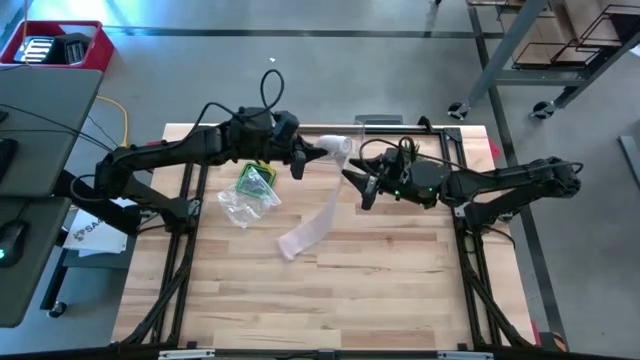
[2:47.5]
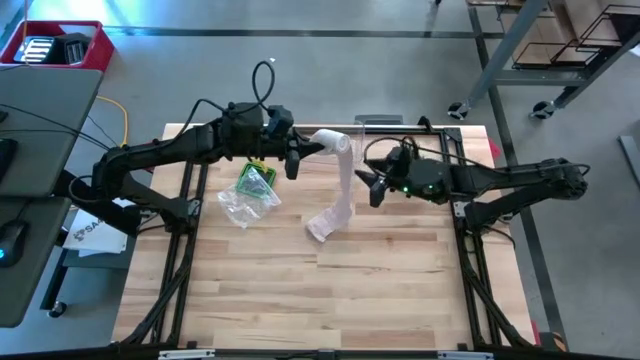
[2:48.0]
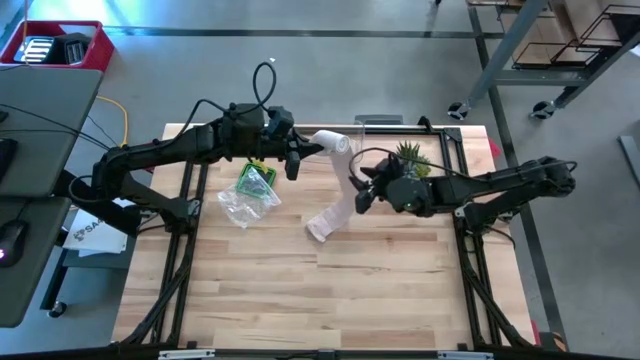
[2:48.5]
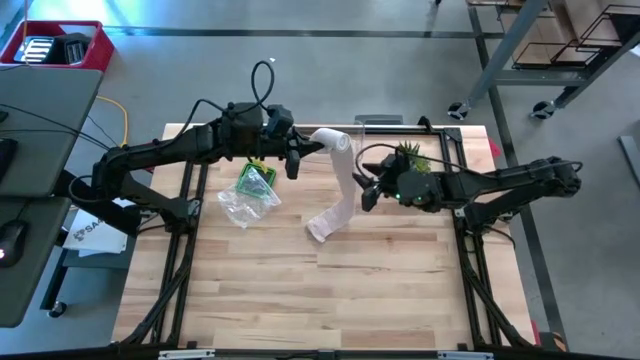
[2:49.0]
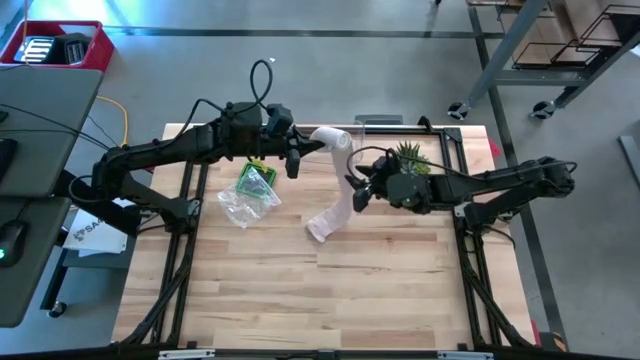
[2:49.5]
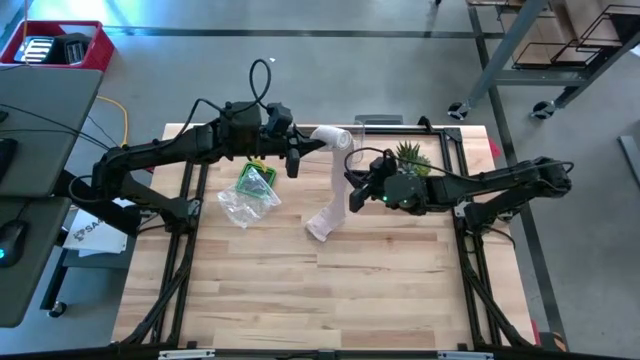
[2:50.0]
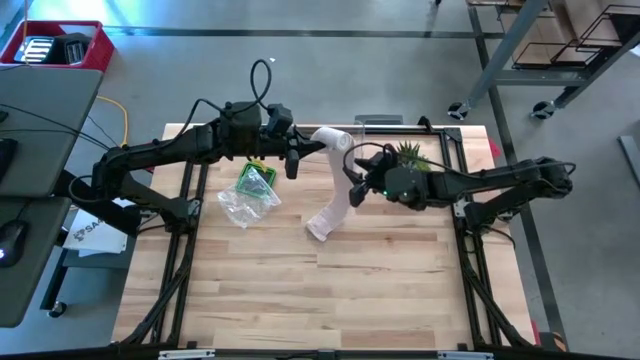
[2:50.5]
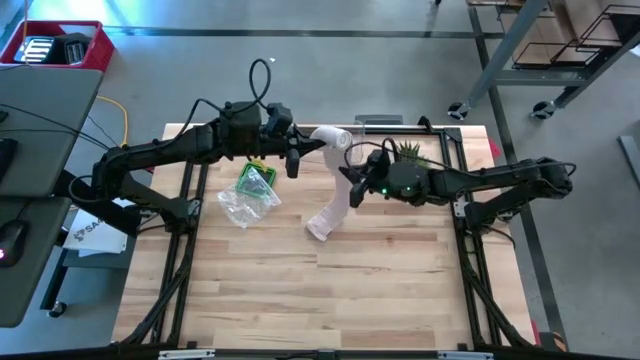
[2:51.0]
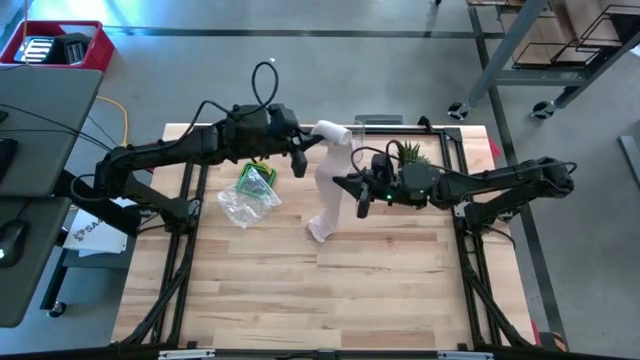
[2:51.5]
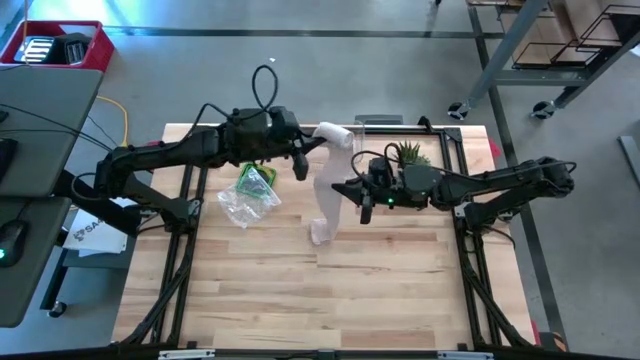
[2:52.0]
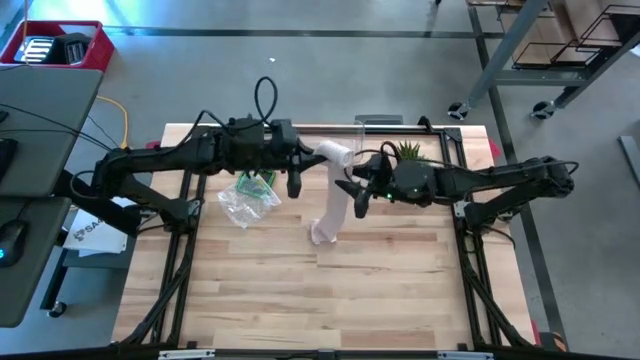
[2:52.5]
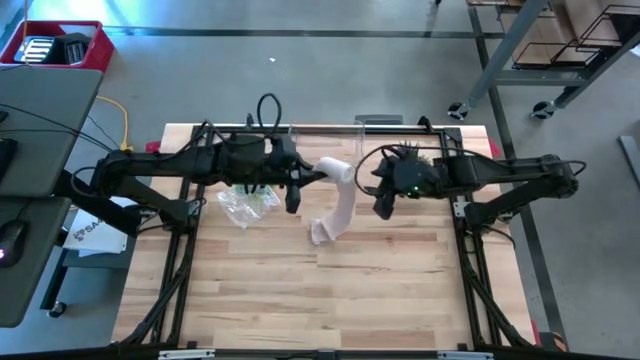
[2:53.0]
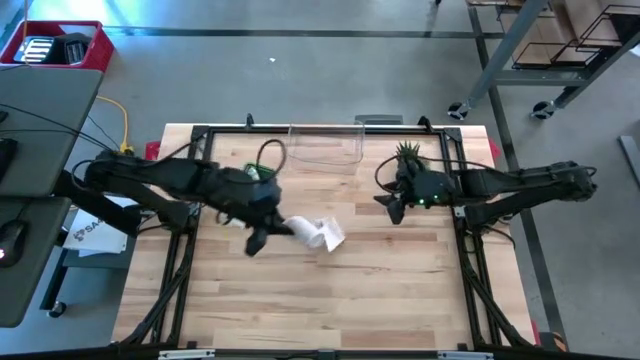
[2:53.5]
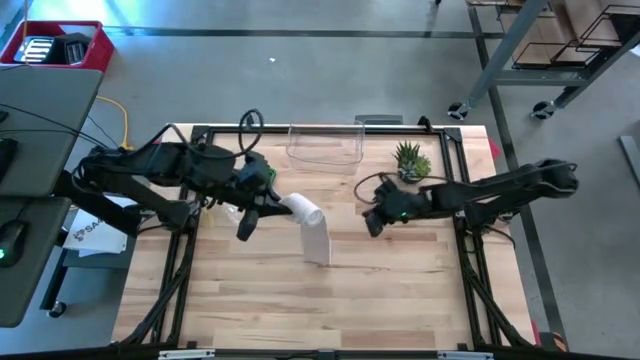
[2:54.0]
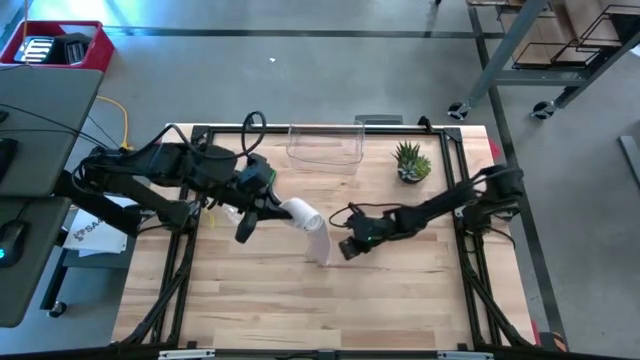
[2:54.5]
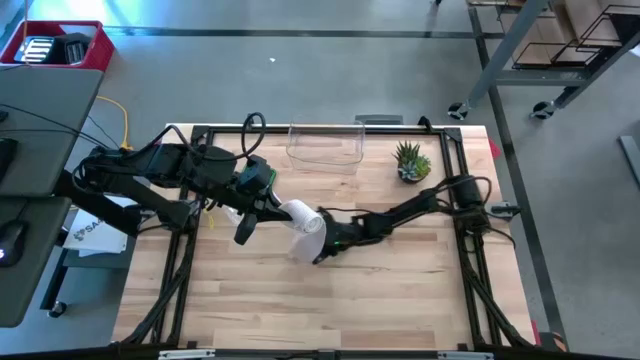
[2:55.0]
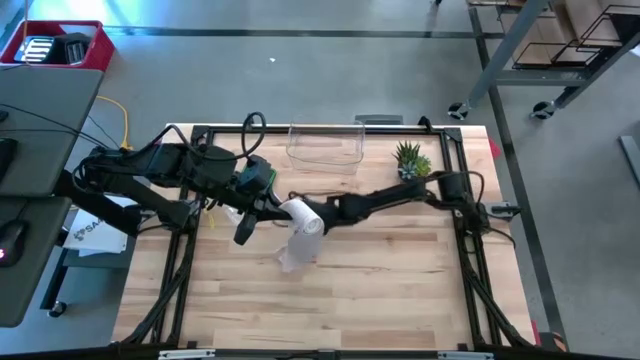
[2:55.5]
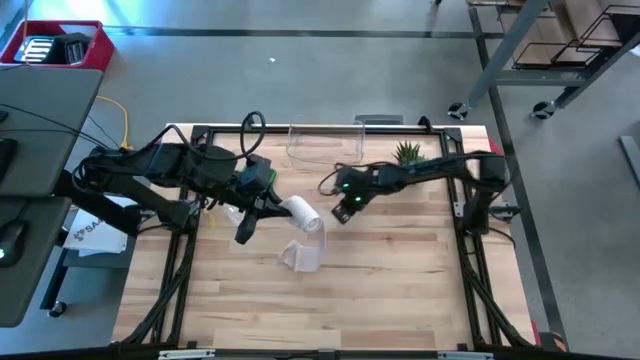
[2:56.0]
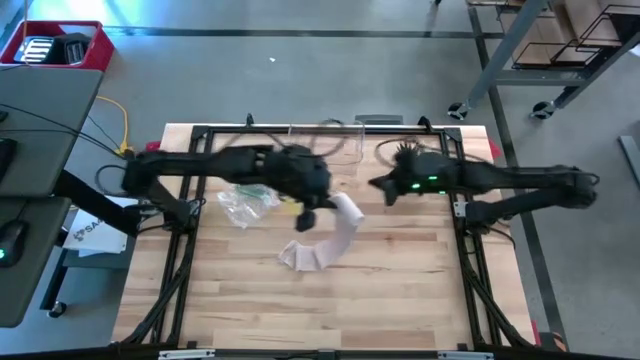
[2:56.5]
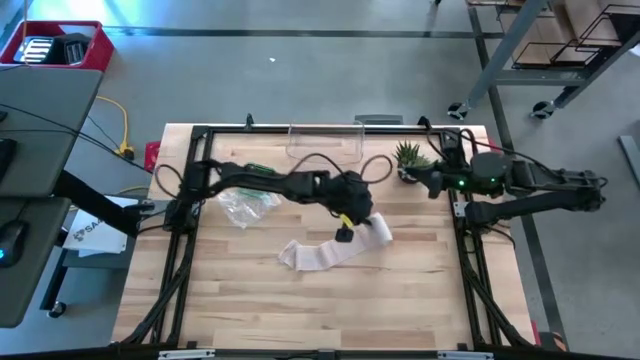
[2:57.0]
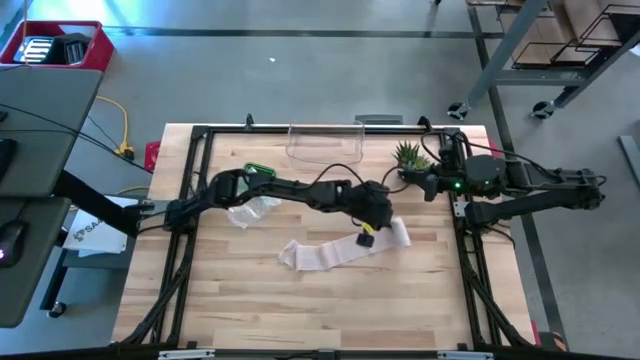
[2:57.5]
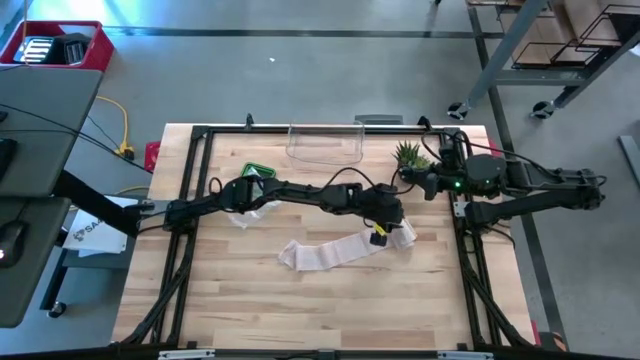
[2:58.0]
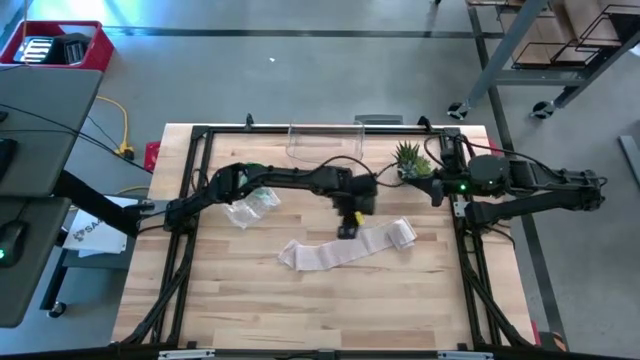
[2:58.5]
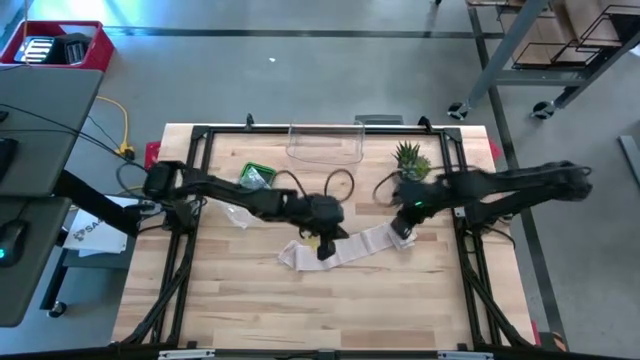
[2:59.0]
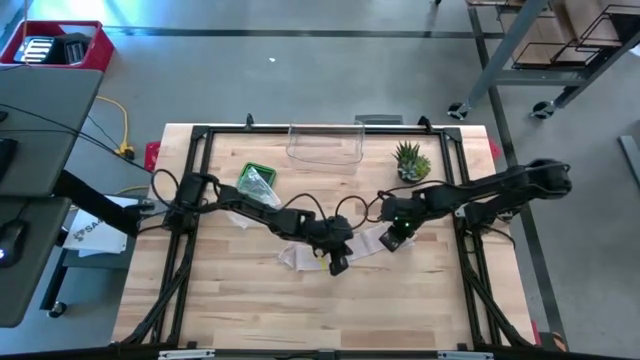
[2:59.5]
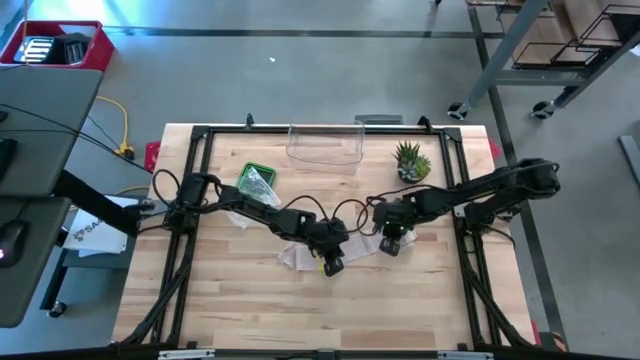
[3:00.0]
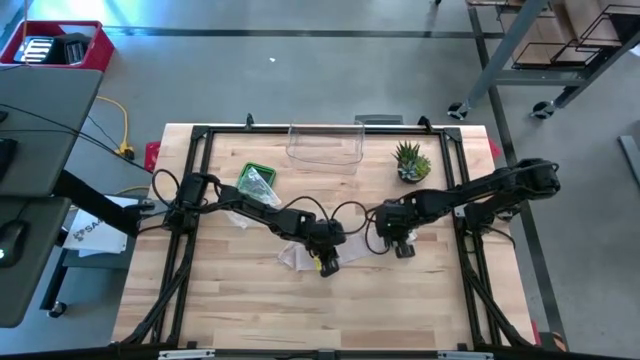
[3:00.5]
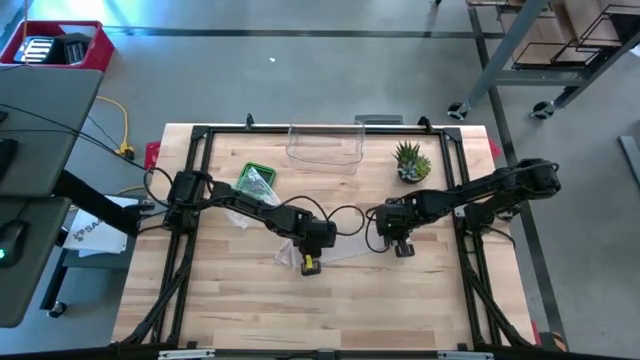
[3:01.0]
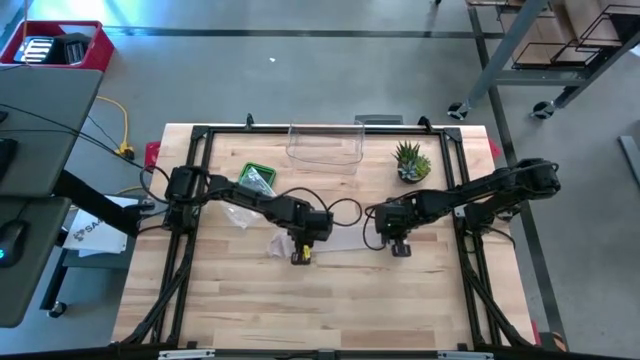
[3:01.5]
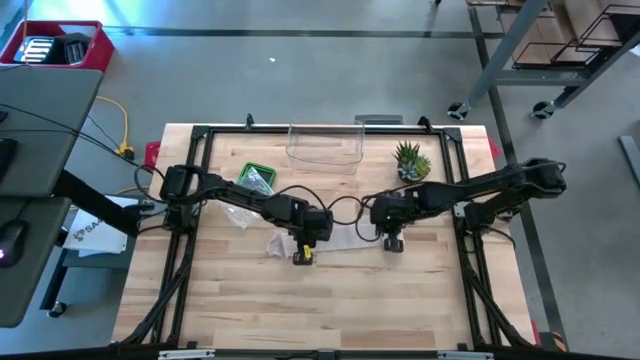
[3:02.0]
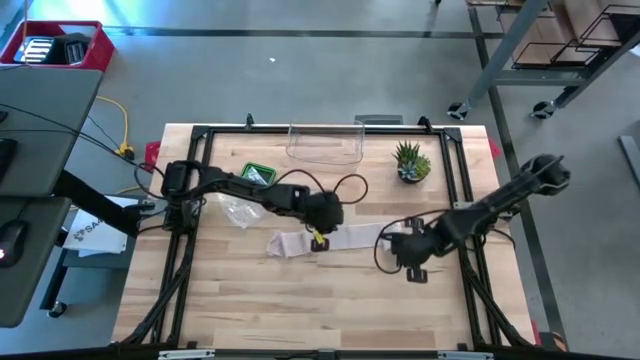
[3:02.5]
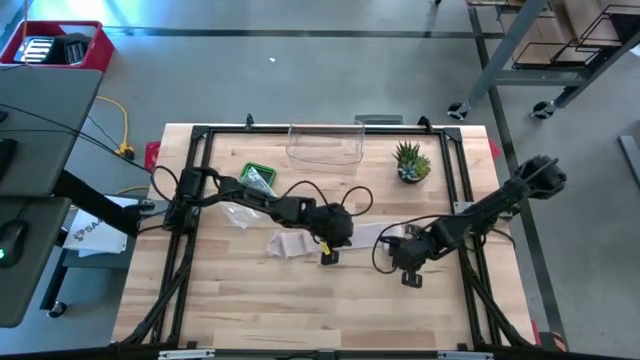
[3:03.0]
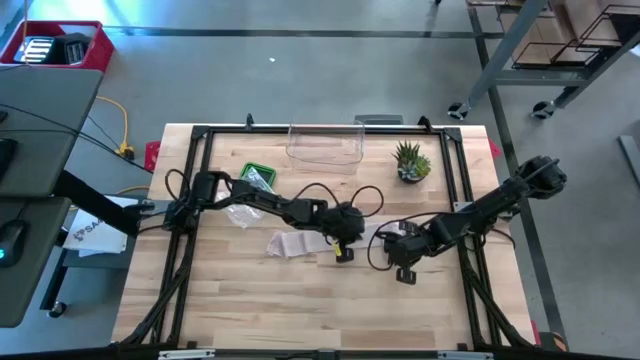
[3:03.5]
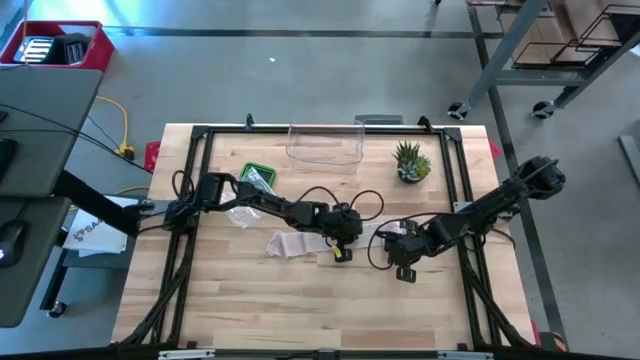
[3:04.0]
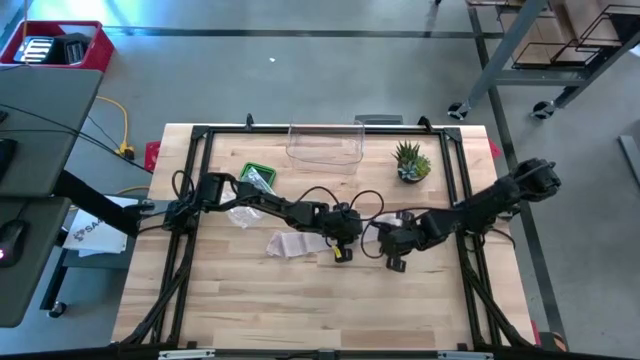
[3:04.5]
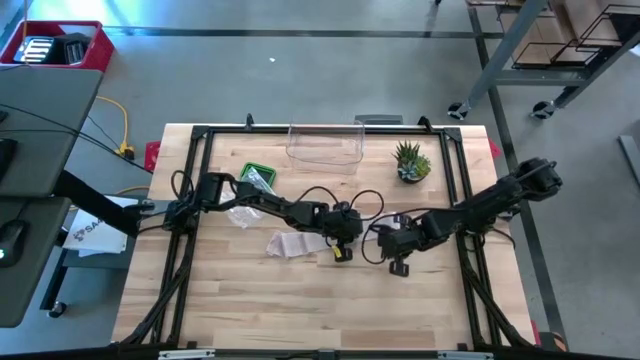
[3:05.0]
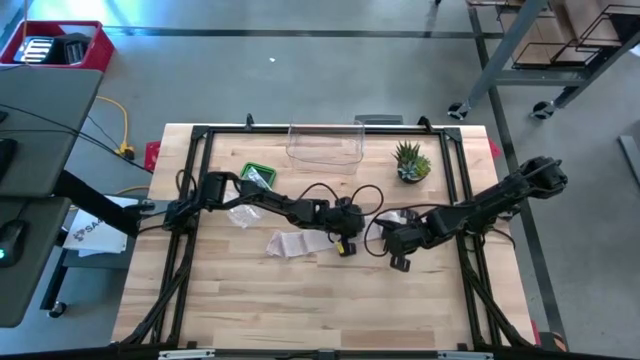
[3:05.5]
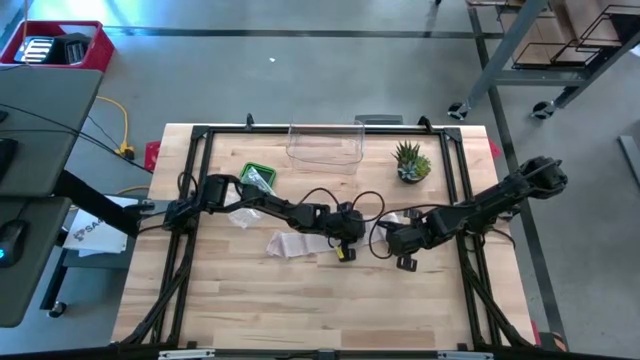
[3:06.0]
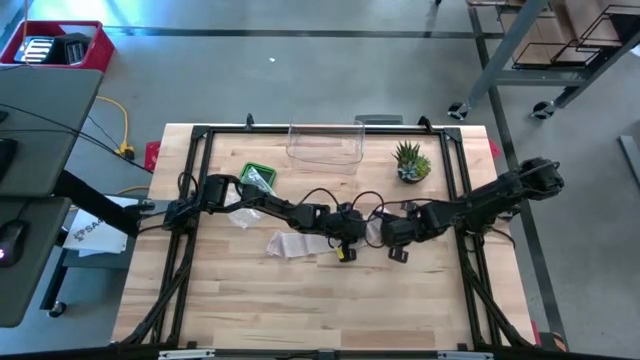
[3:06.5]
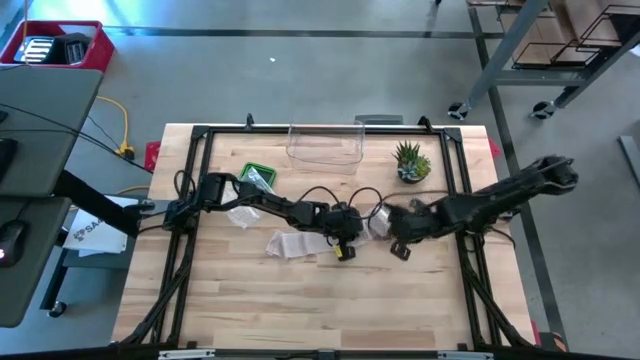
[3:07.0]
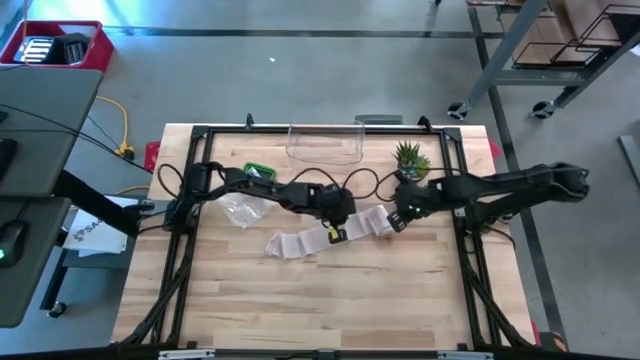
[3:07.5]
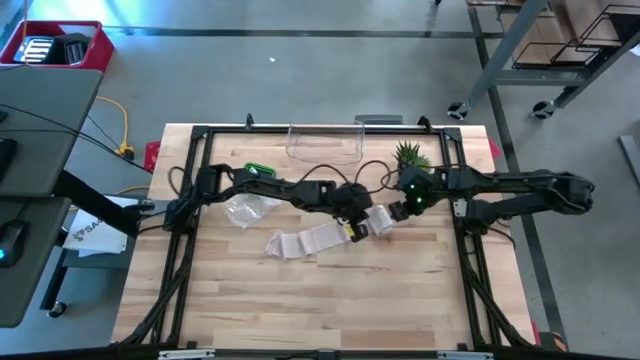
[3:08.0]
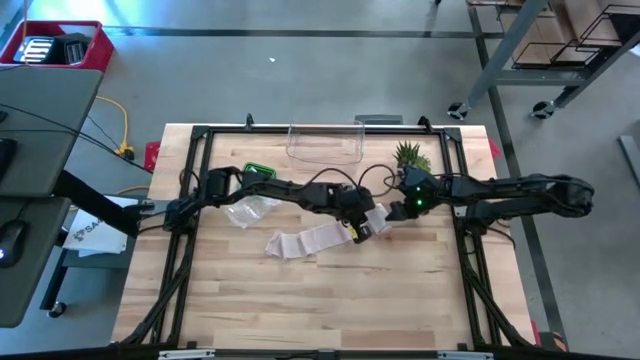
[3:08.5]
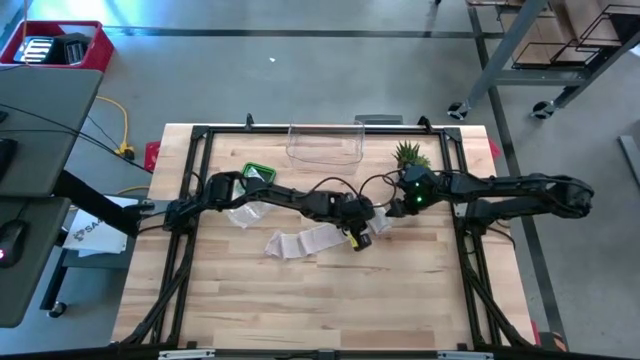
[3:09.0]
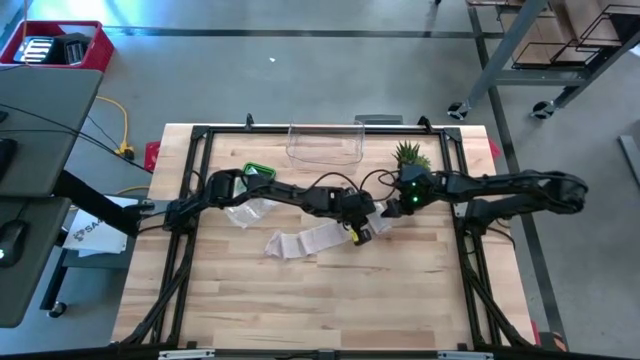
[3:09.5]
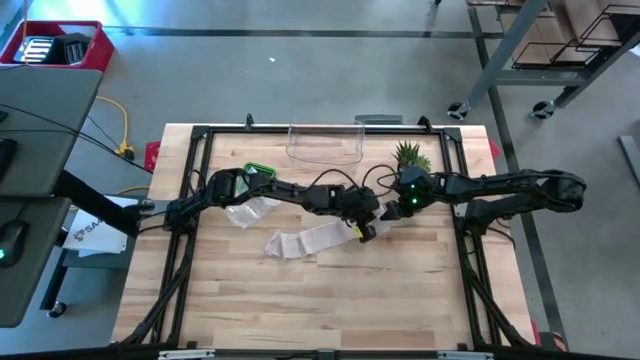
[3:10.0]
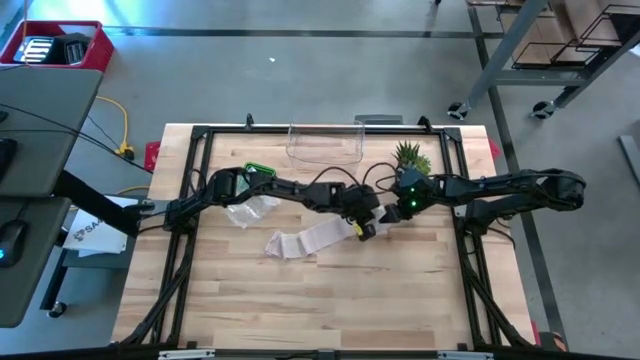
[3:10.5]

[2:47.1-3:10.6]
Task: Roll bandage
Roll the bandage
